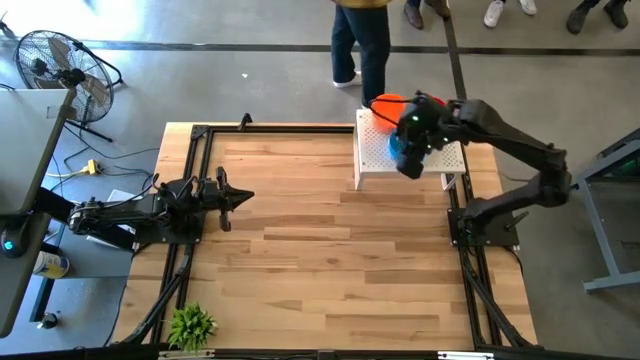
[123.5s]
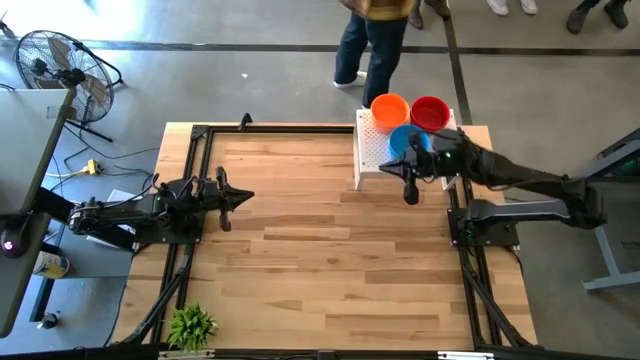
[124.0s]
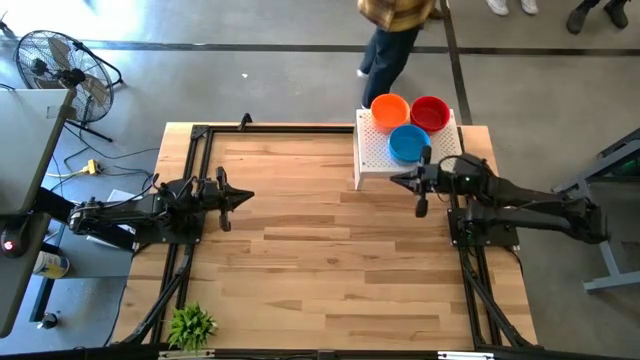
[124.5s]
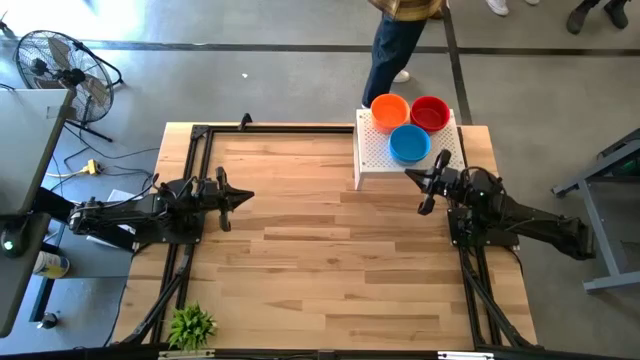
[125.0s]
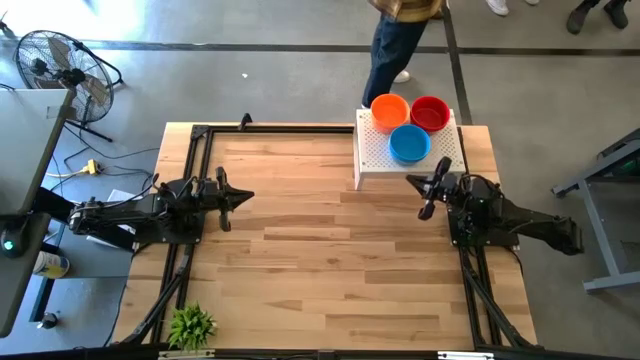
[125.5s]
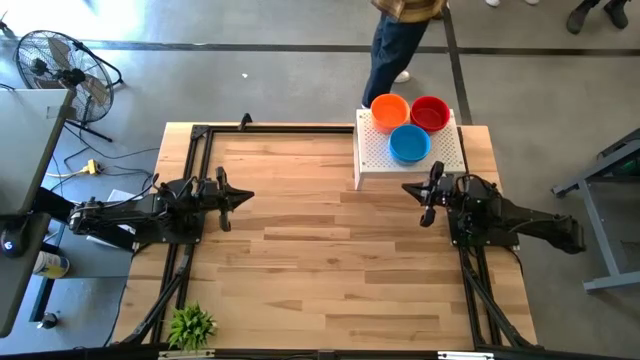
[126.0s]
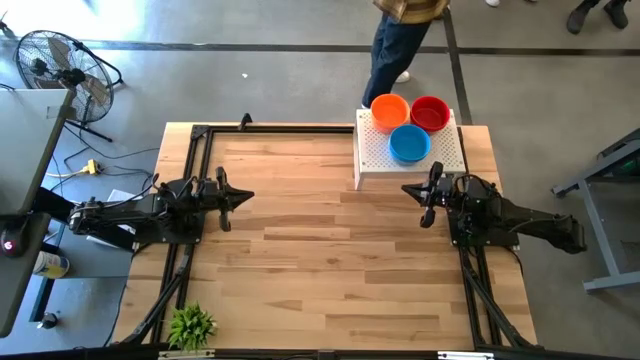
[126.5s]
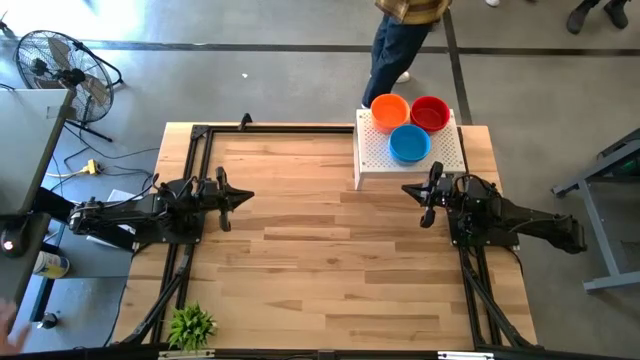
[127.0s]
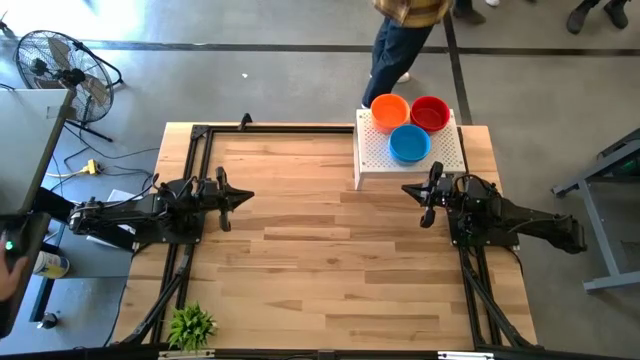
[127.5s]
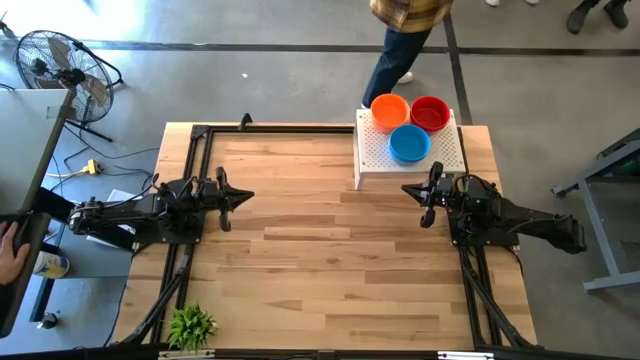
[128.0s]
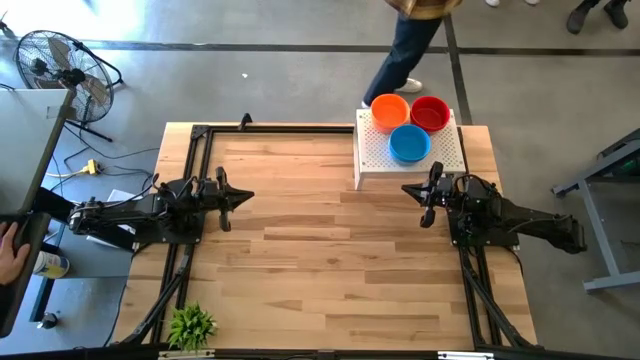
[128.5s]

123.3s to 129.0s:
Task: Pick & Place Mini bowls
Return to Home Position

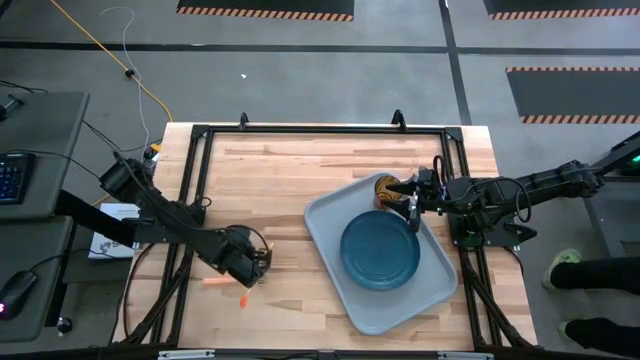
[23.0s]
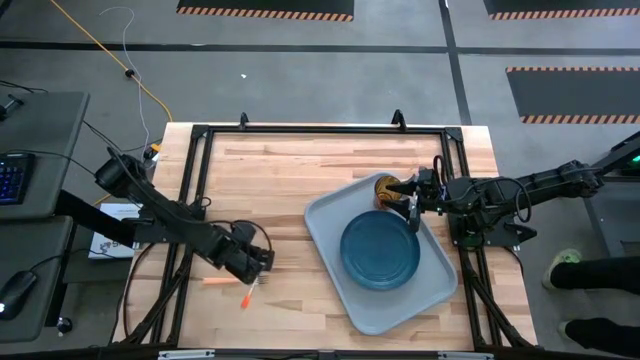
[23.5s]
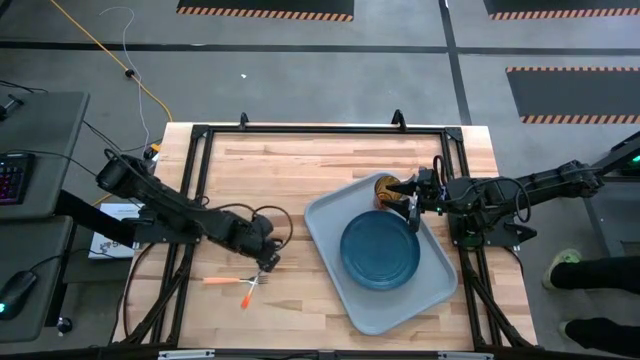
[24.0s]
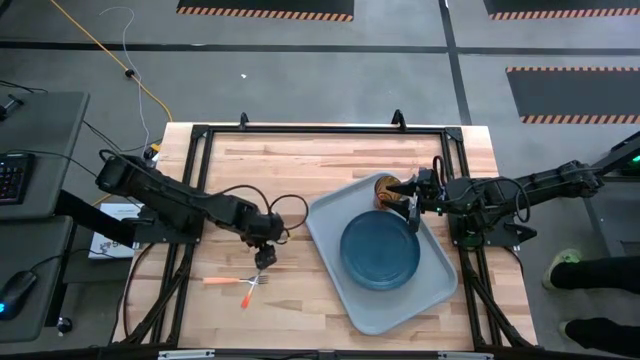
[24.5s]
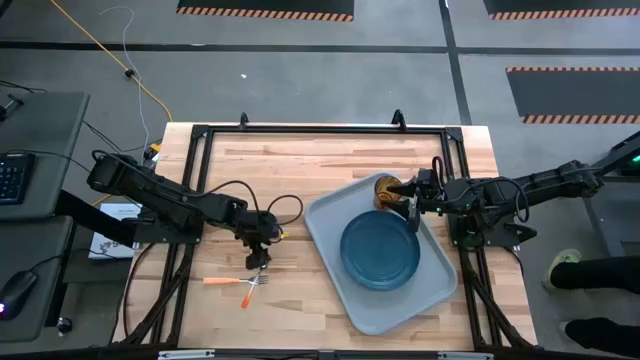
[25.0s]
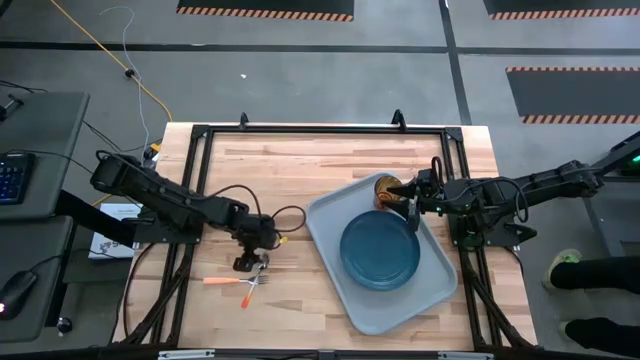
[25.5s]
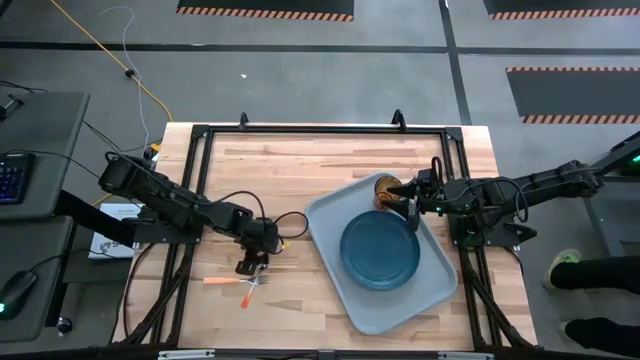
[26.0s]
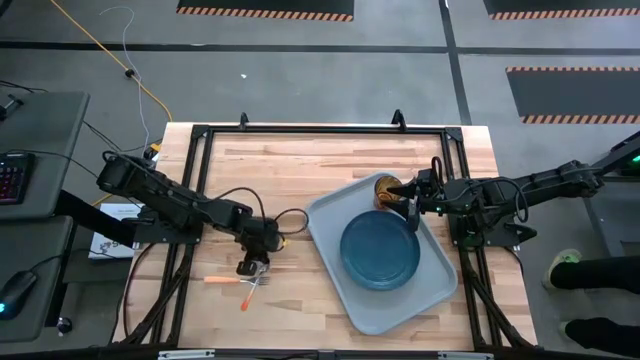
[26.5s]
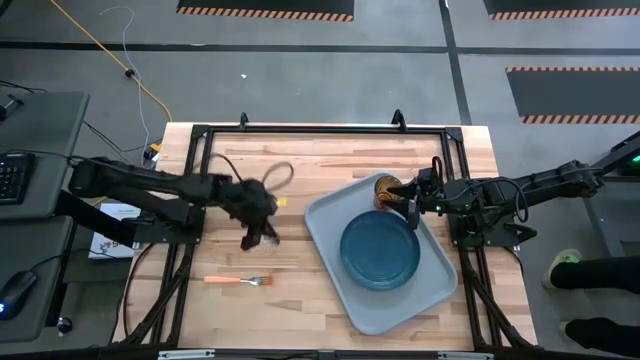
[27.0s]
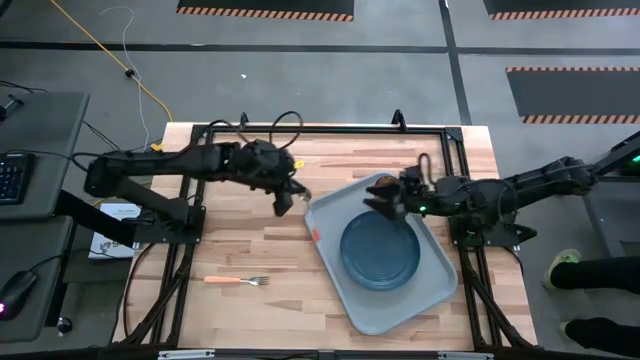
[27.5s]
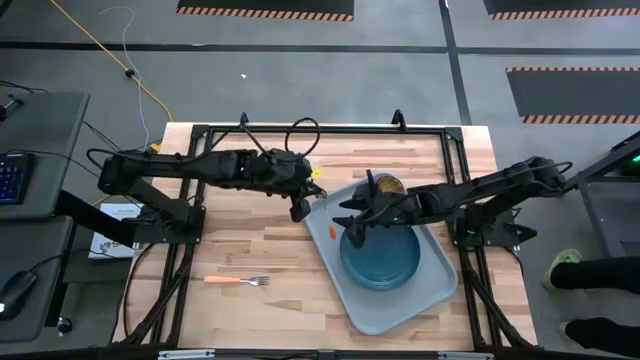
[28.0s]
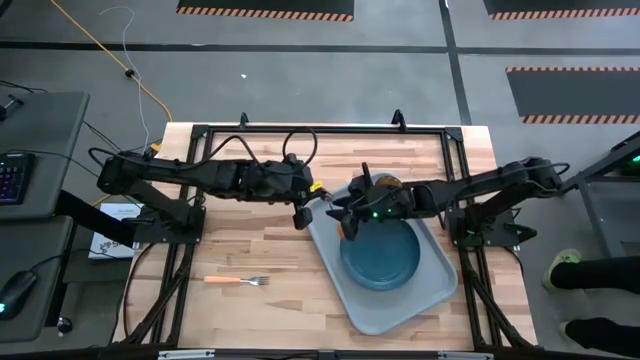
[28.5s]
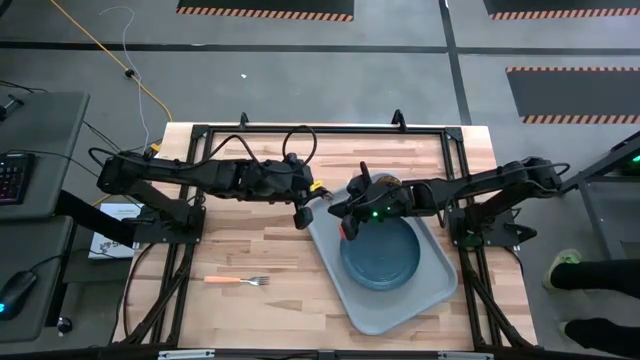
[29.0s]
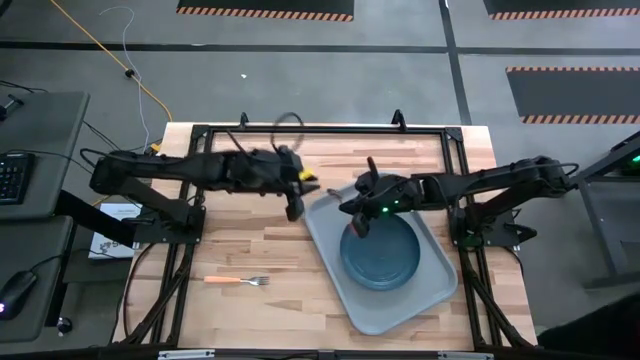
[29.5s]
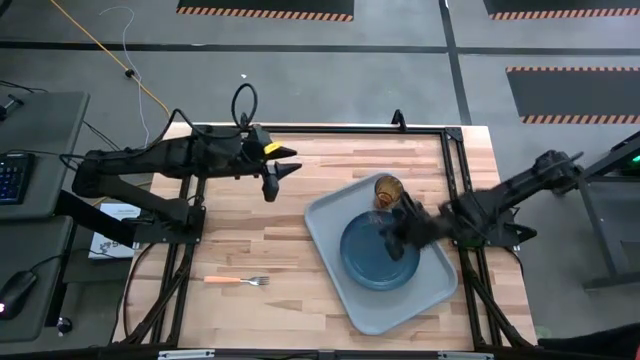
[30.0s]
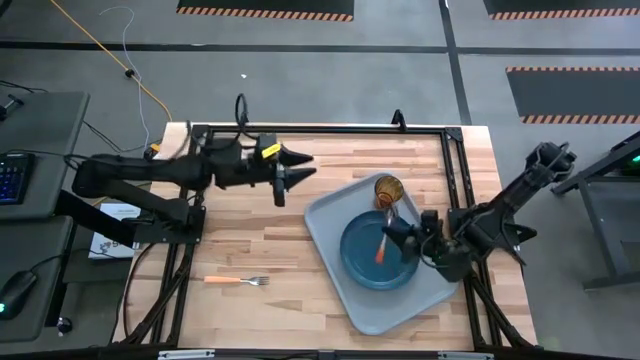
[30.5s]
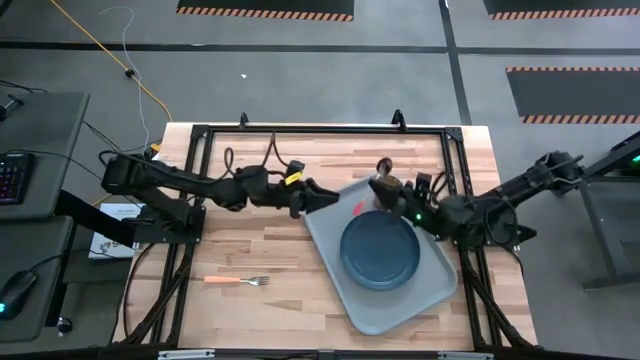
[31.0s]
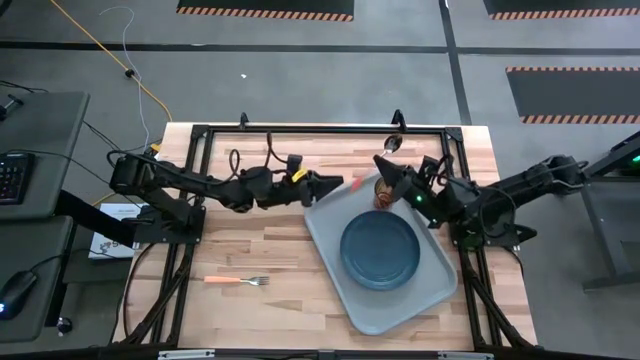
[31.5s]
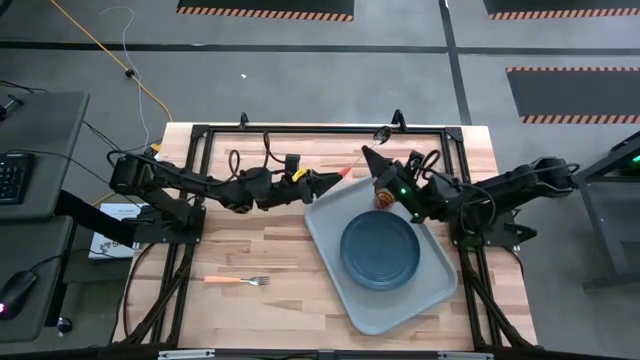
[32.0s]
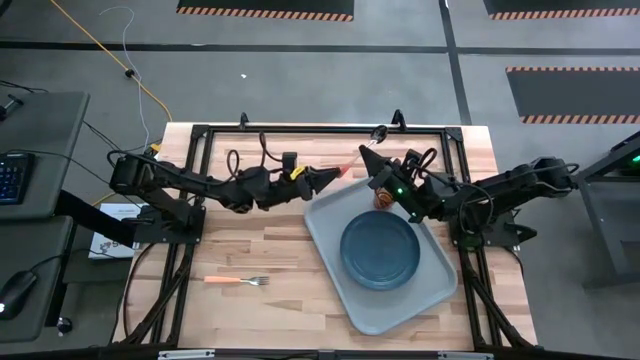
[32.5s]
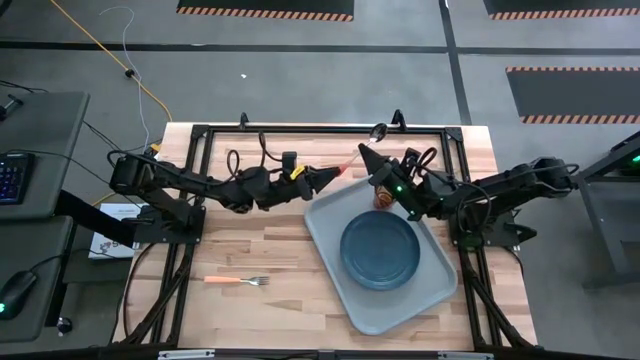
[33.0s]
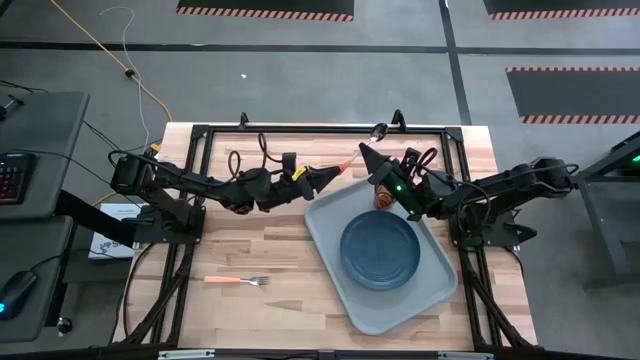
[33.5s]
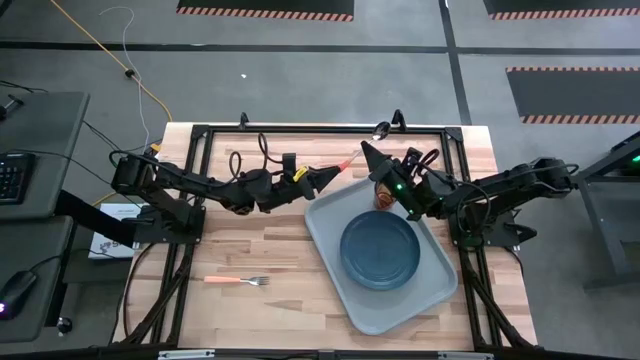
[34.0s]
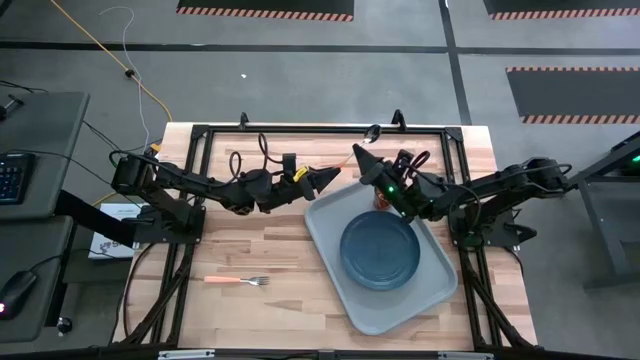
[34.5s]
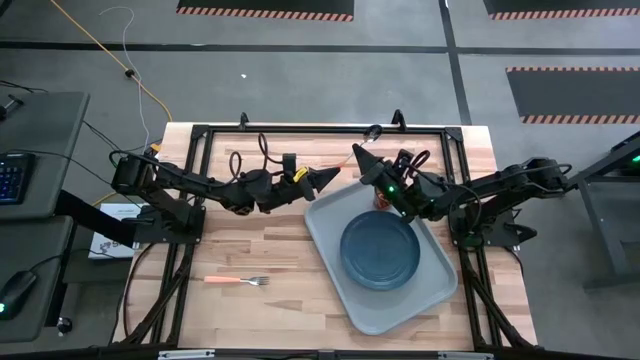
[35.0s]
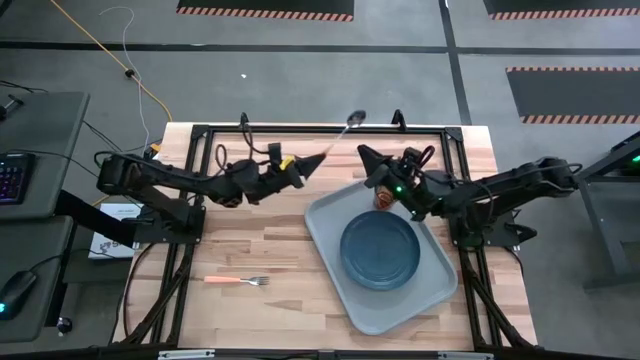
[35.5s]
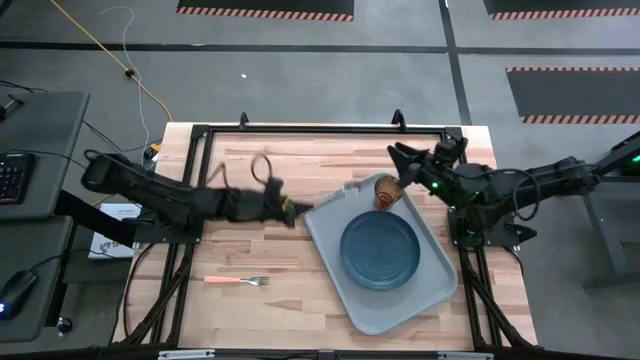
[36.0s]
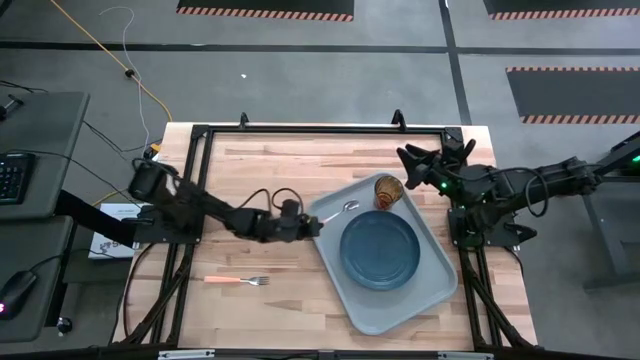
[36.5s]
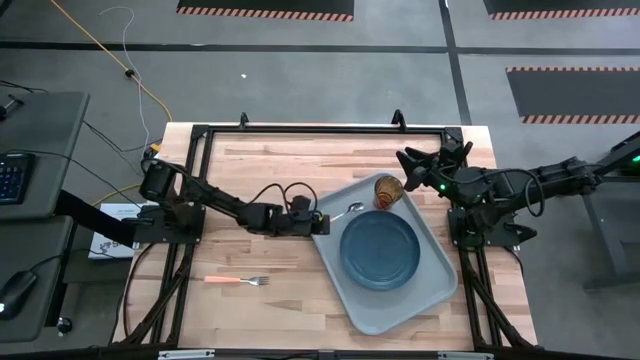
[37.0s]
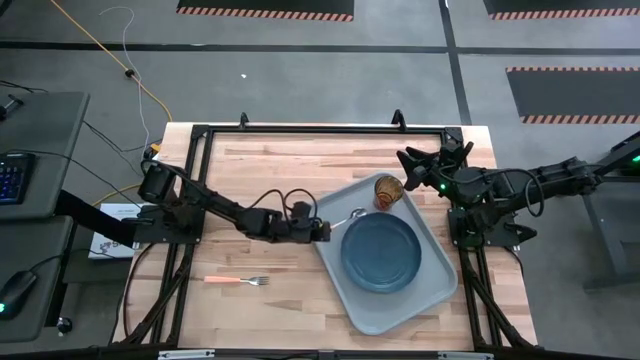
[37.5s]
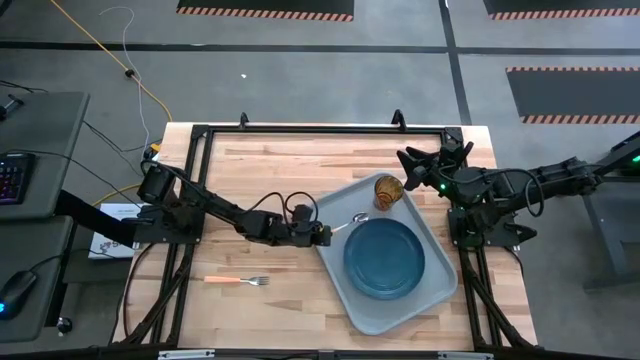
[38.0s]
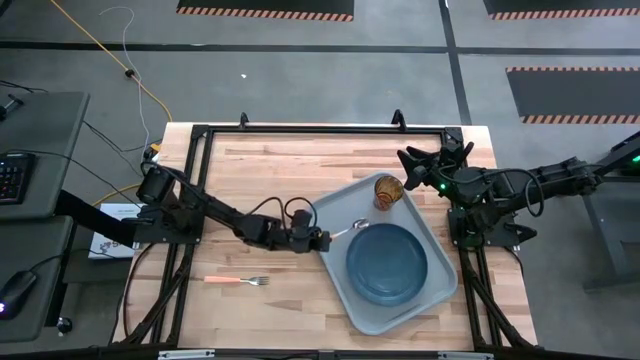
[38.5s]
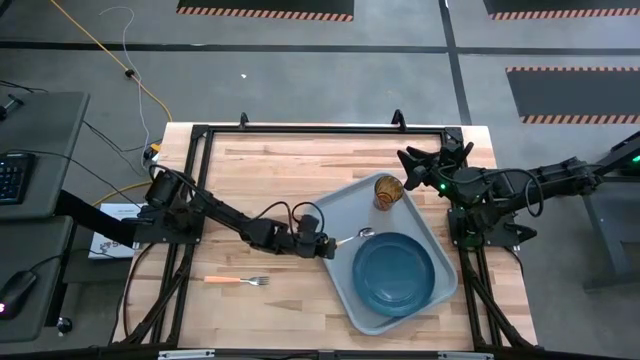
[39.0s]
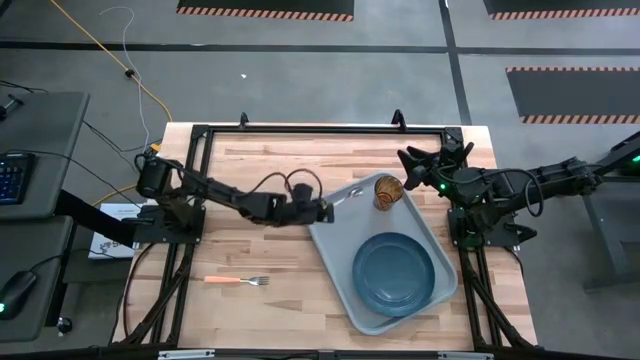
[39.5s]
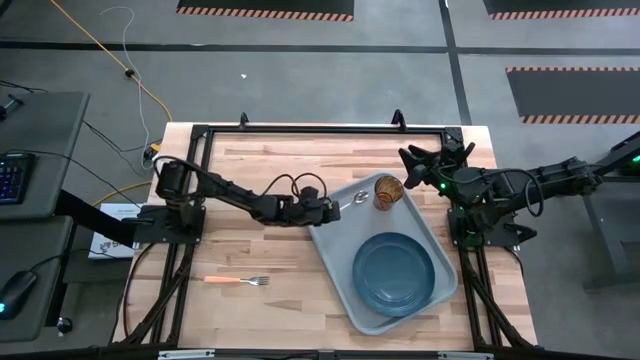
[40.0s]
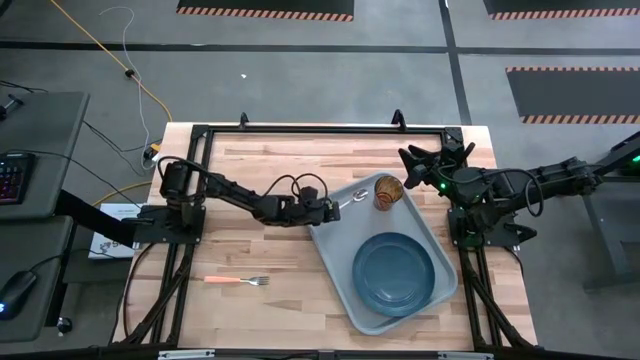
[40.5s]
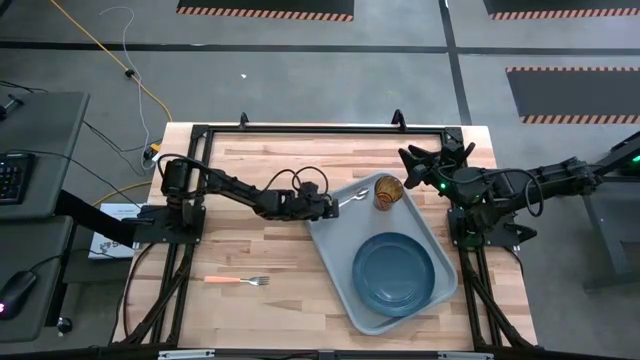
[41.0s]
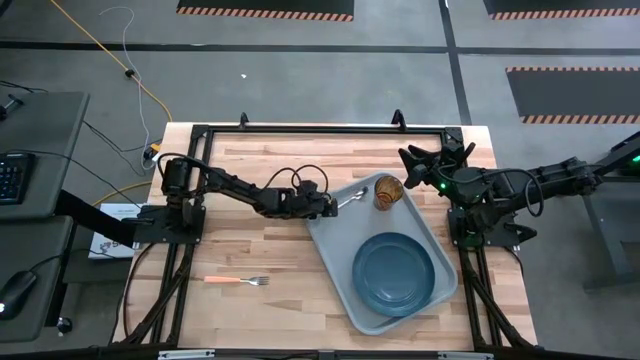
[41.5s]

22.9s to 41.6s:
Task: Pick and place plate/cup/fork/spoon on tray
Put the orange spoon on the gray serving tray to the left of the blue plate
